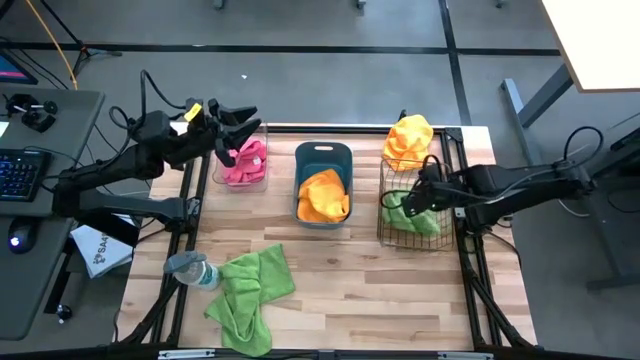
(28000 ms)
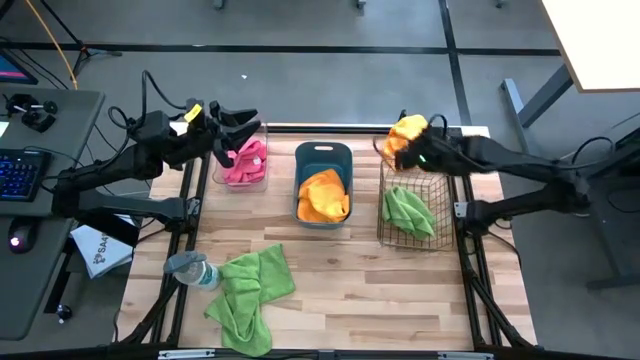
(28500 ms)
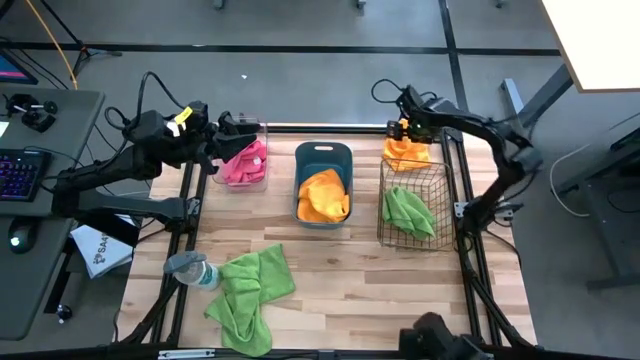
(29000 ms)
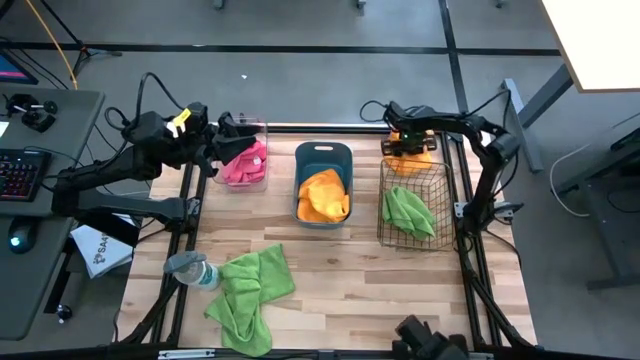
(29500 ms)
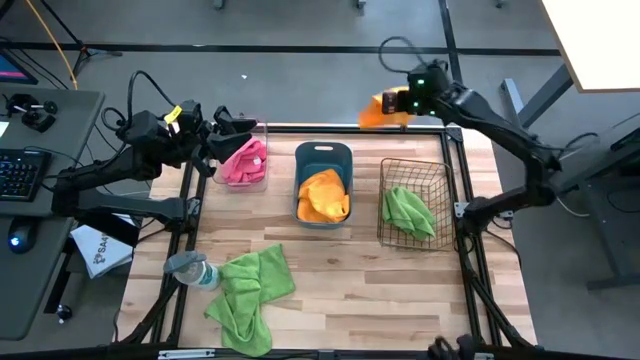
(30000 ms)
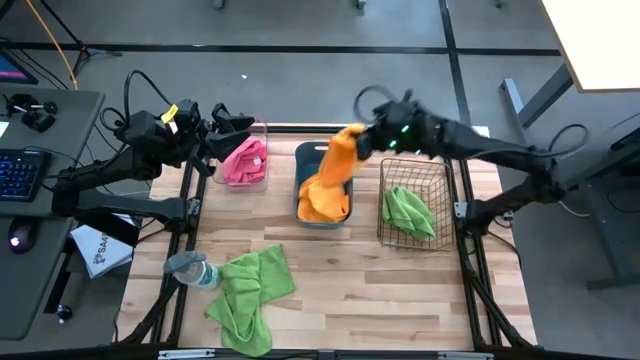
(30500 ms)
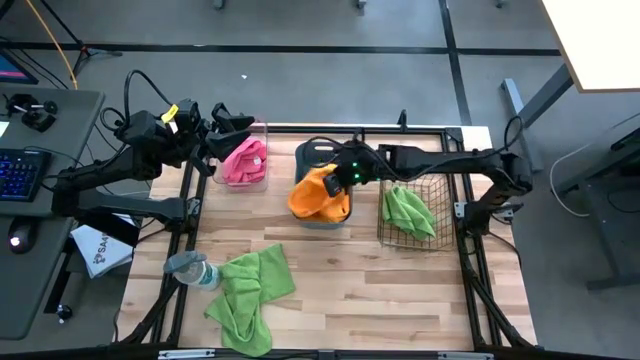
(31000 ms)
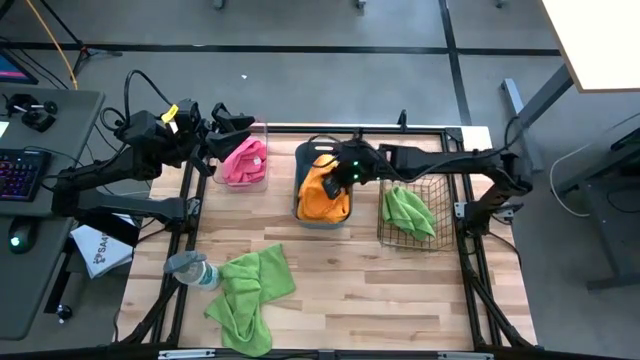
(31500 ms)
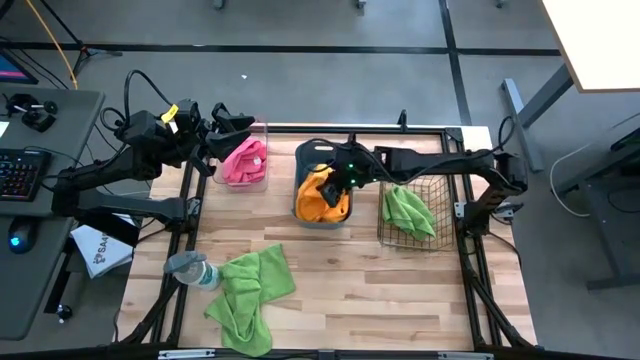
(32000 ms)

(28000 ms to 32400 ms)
Task: Sort microfiber towel by color & place in baskets
Put the yellow towel into the blue bin

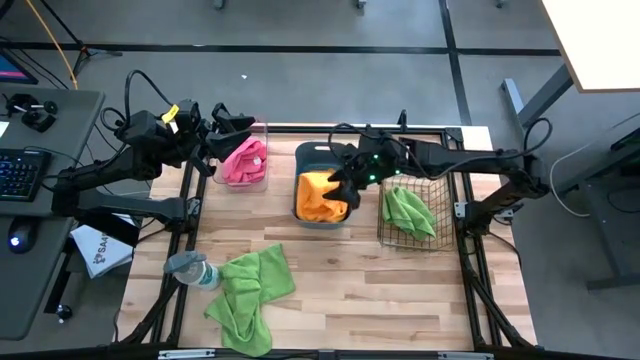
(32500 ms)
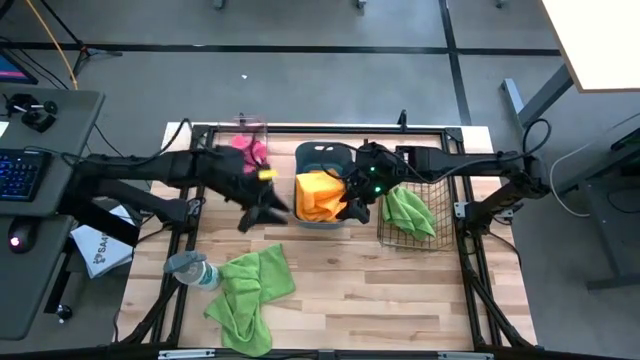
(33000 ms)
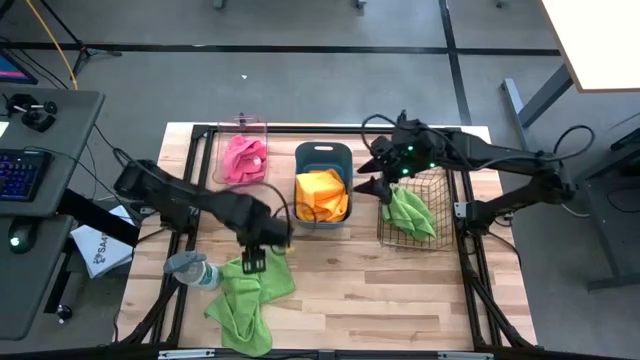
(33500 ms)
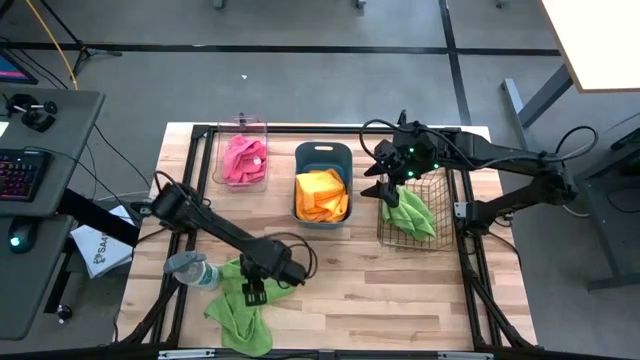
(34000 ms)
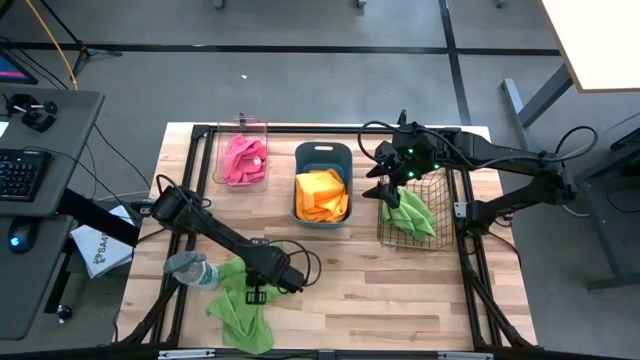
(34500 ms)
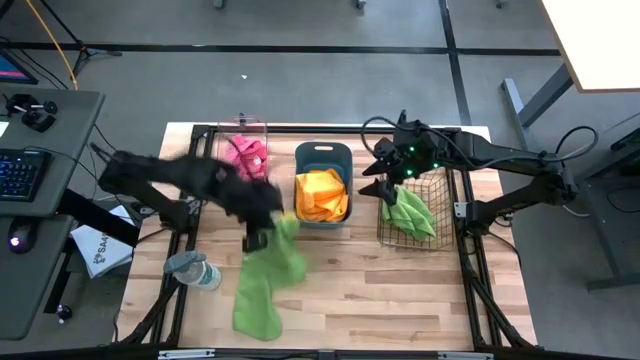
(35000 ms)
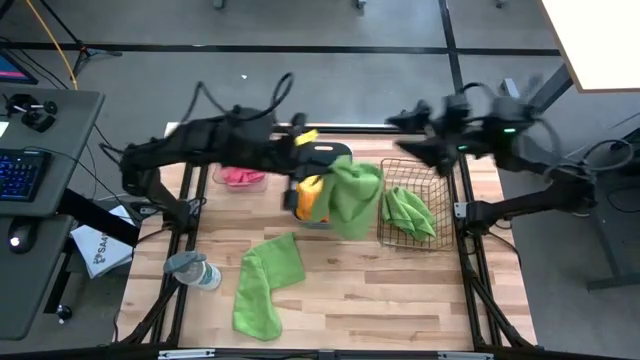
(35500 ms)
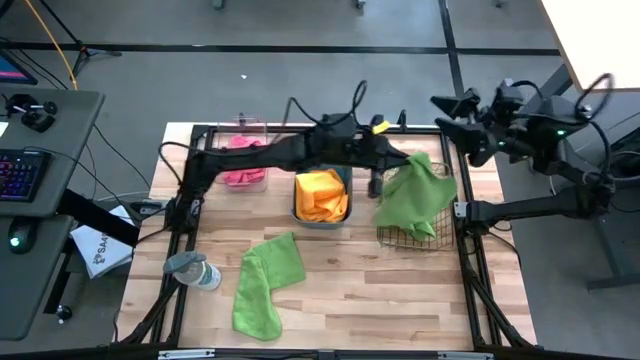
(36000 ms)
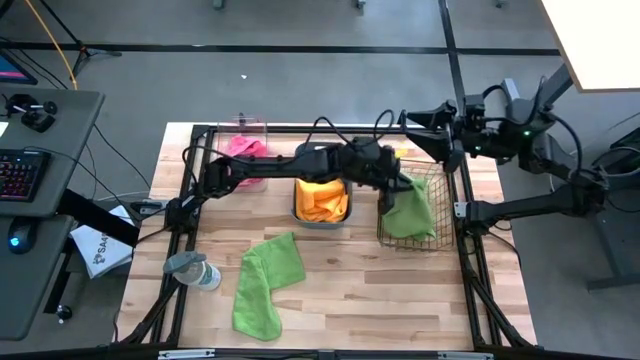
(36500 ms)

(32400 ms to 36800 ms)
Put the top green towel into the gold wire basket

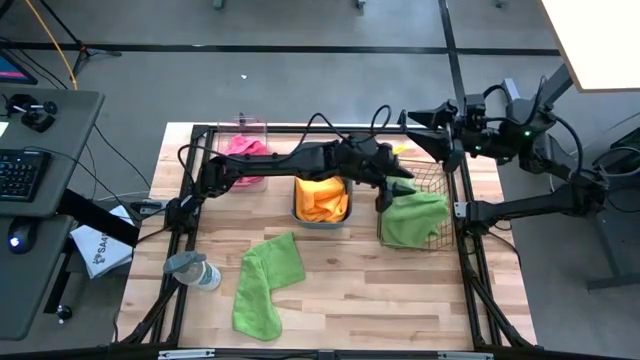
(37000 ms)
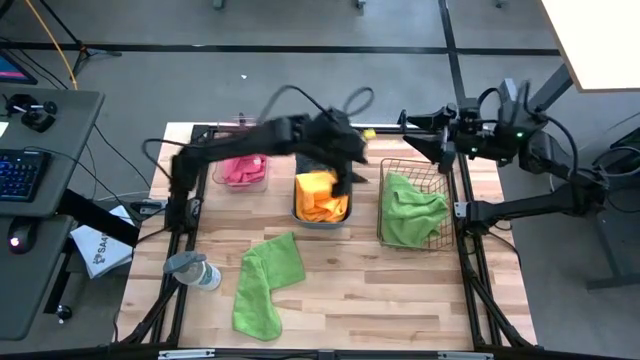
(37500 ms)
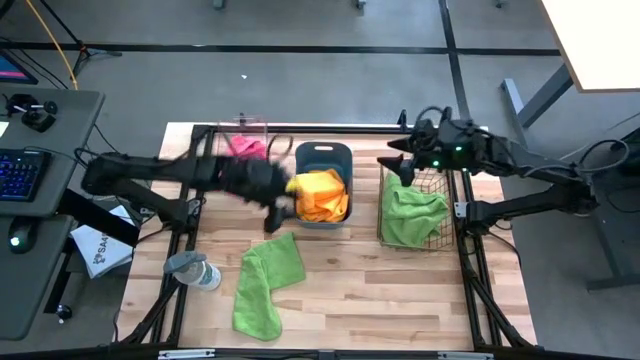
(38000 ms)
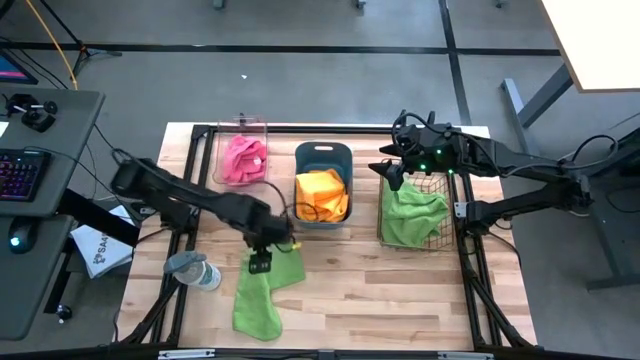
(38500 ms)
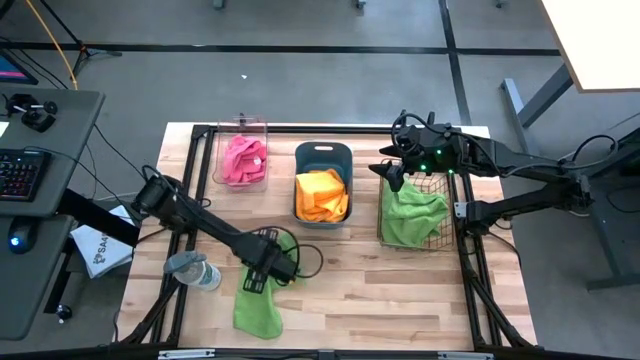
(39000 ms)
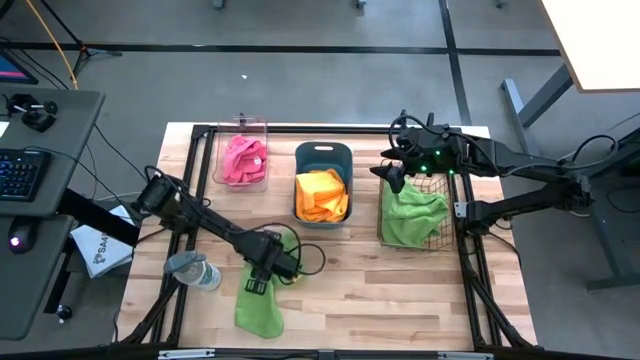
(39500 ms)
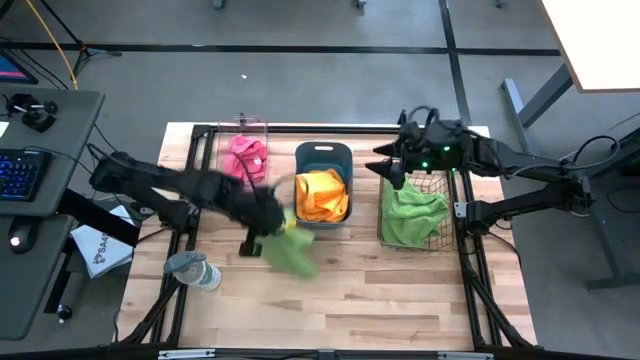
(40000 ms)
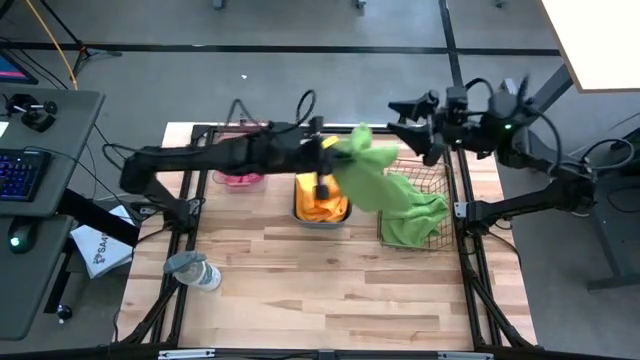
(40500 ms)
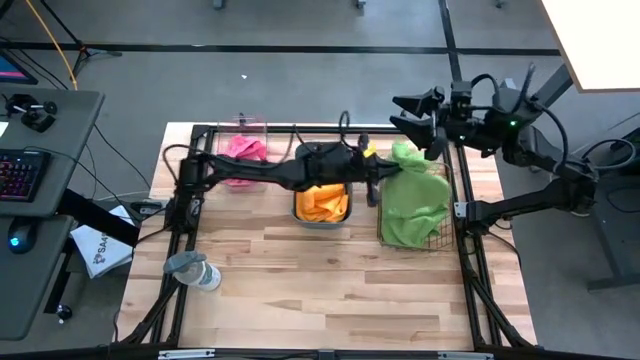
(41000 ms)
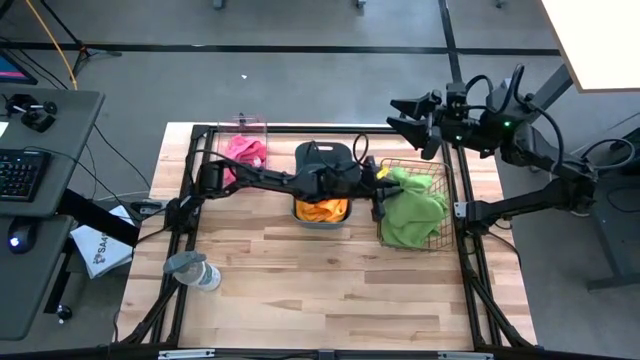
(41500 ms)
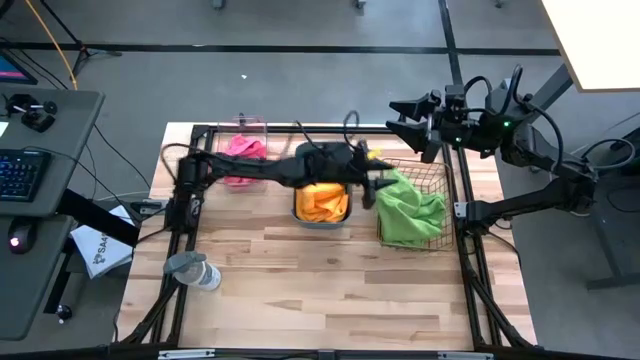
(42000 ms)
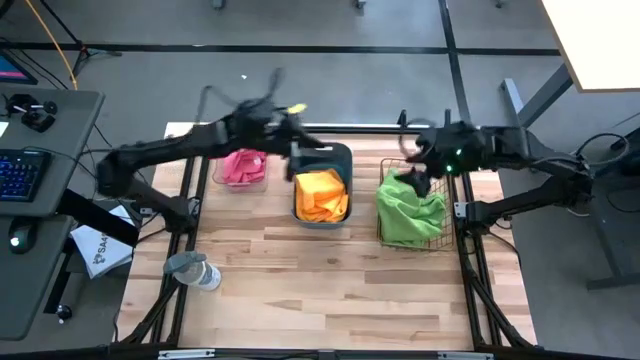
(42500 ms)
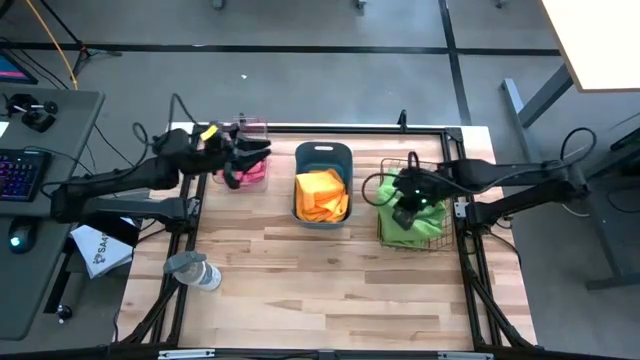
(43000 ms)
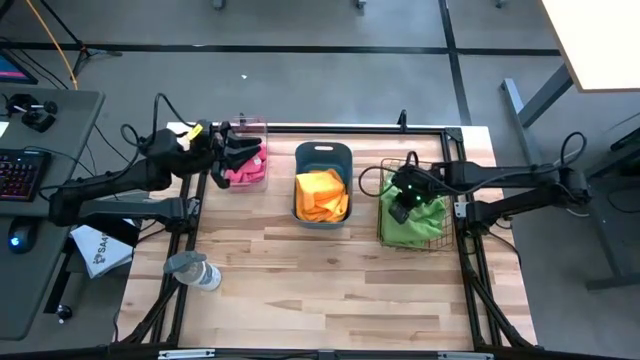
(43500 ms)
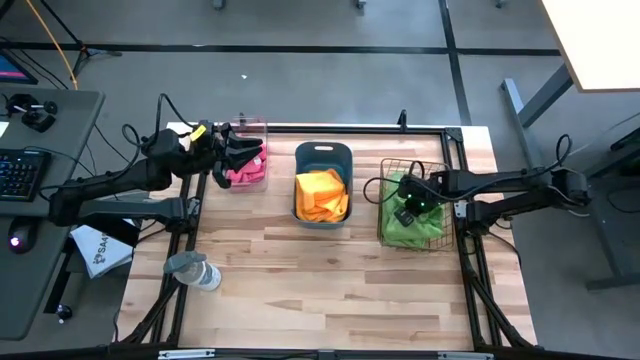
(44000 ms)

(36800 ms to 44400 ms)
Put the green towel into the gold wire basket

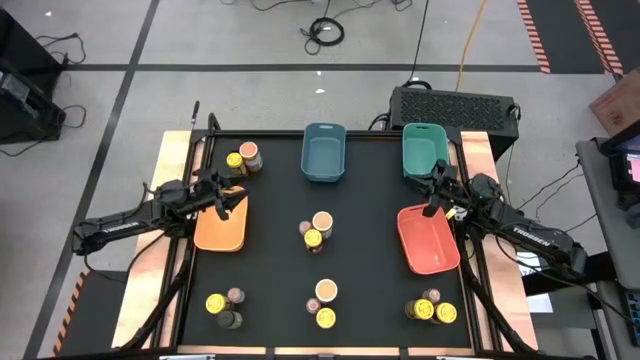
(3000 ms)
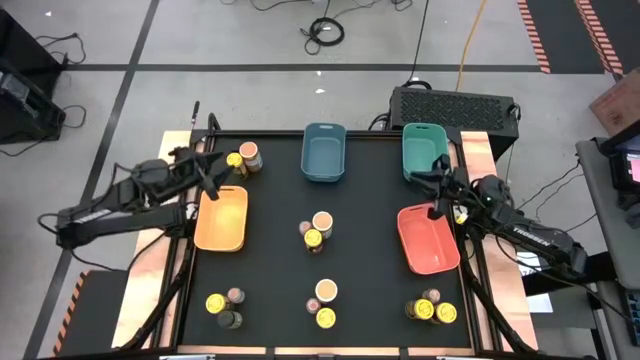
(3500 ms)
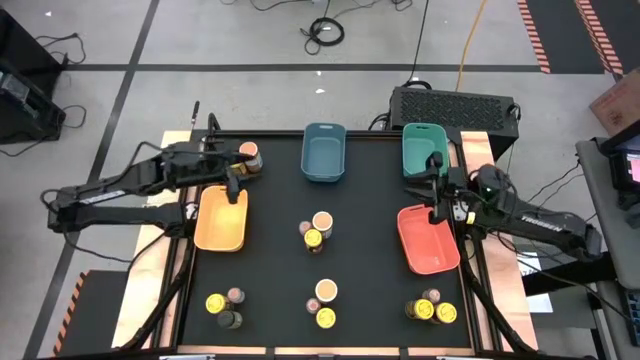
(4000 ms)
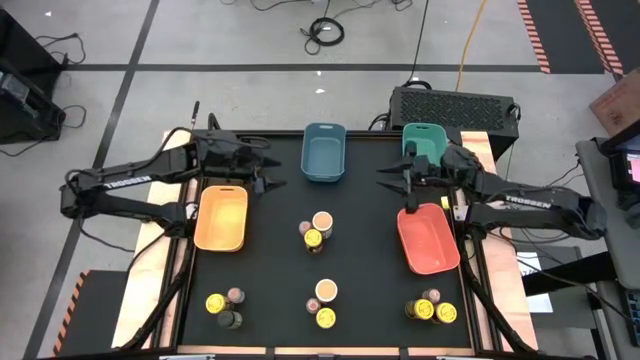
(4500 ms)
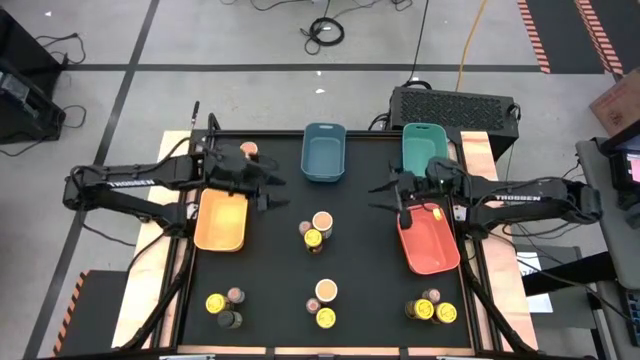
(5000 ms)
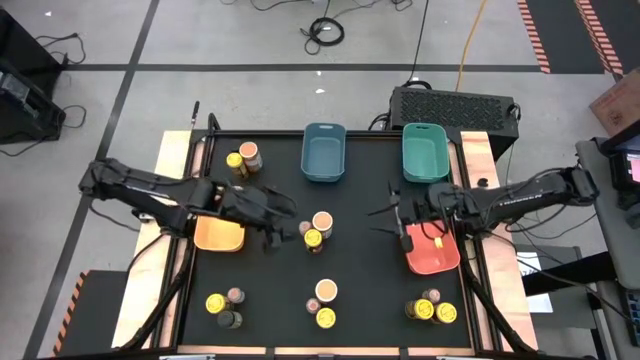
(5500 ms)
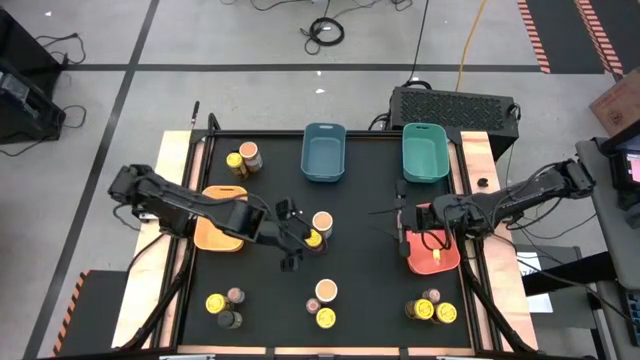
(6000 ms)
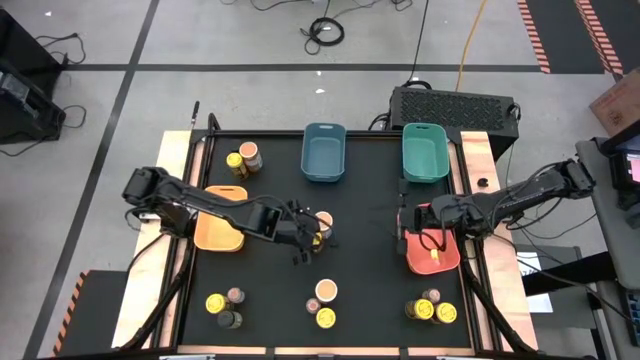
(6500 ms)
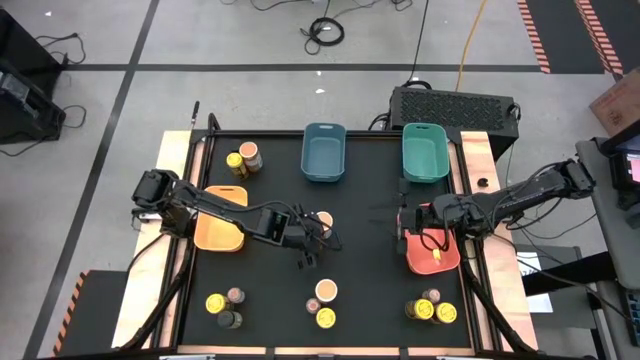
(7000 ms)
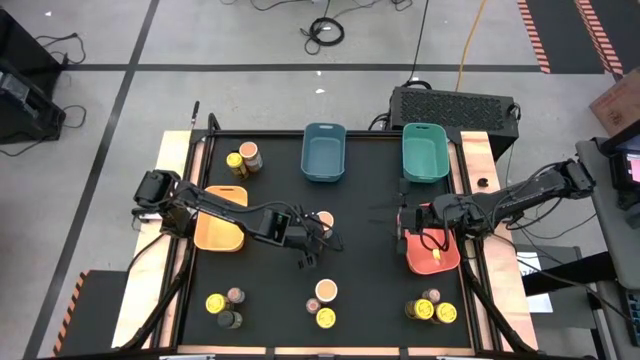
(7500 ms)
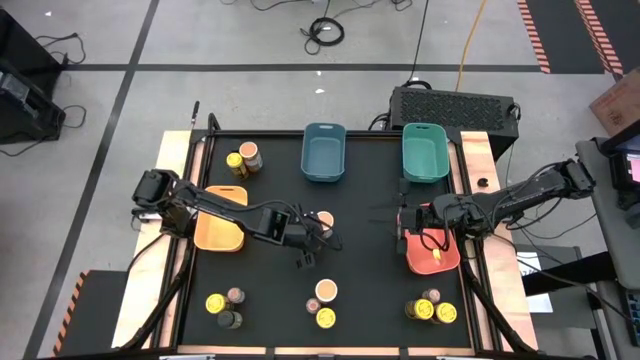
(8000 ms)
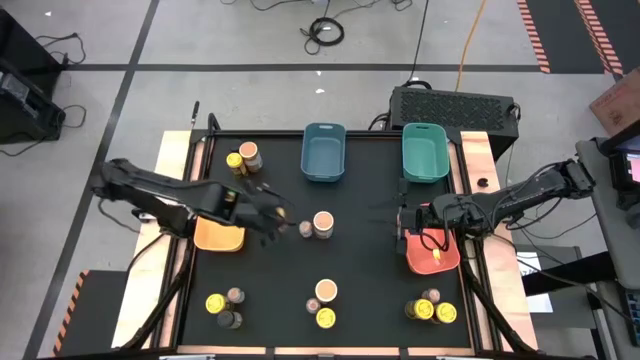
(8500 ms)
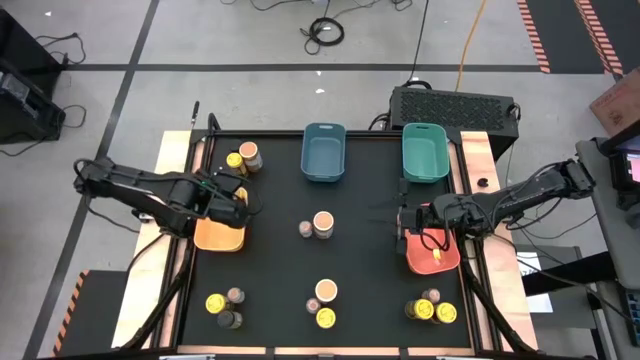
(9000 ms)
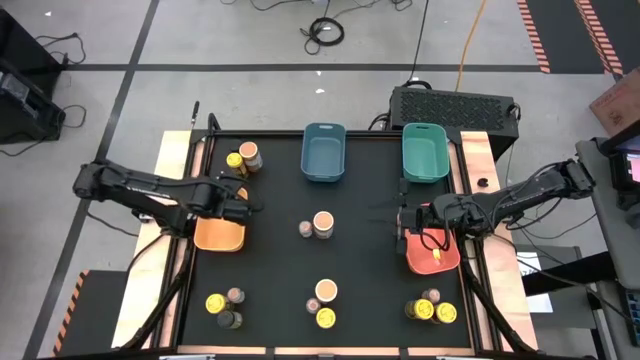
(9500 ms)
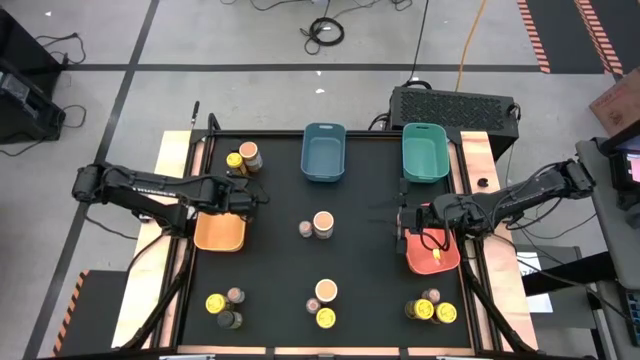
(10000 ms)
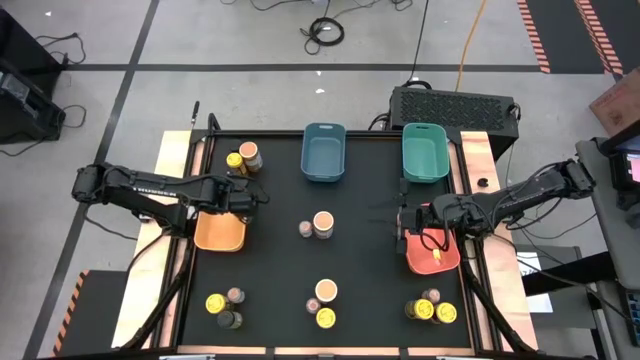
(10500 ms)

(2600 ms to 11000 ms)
Task: Sort spices by type
Put the yellow seasoning can into the yellow bin
